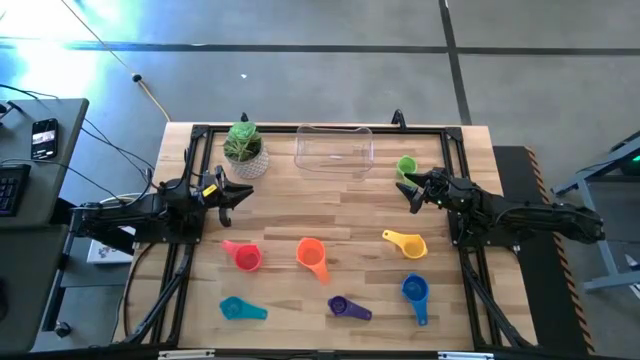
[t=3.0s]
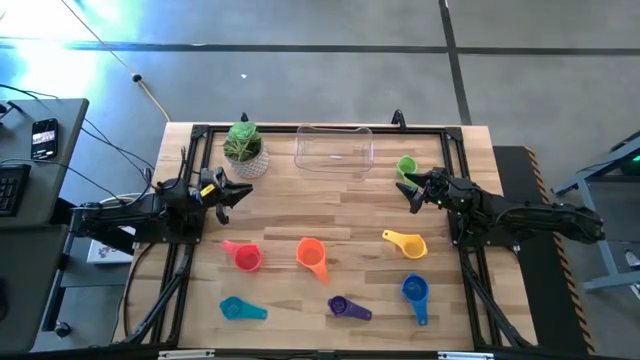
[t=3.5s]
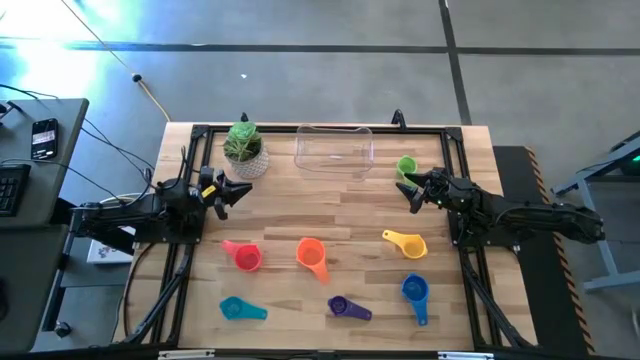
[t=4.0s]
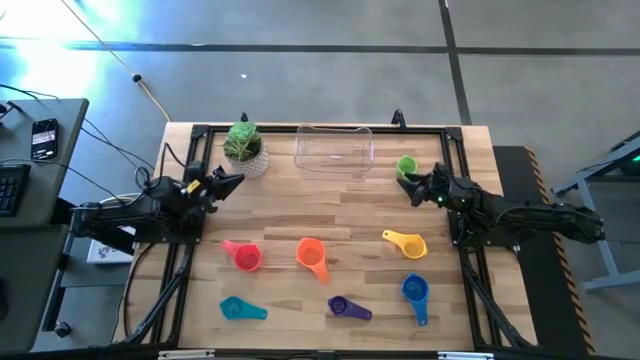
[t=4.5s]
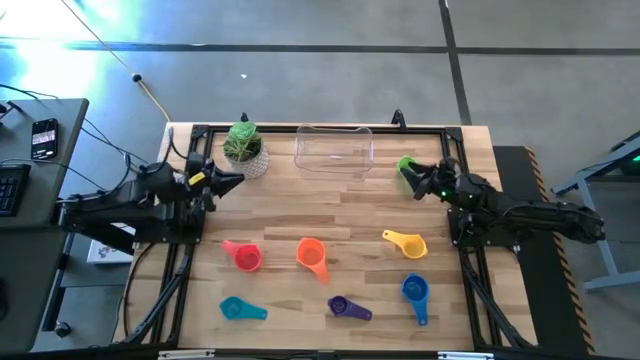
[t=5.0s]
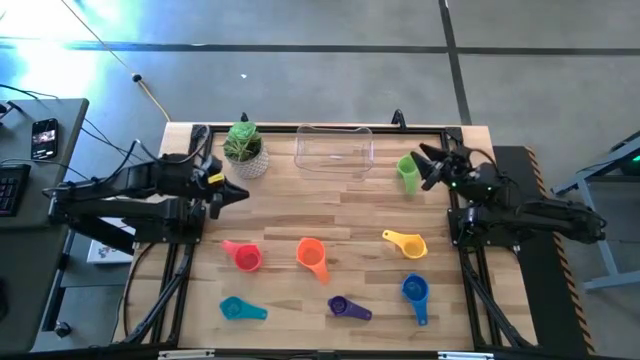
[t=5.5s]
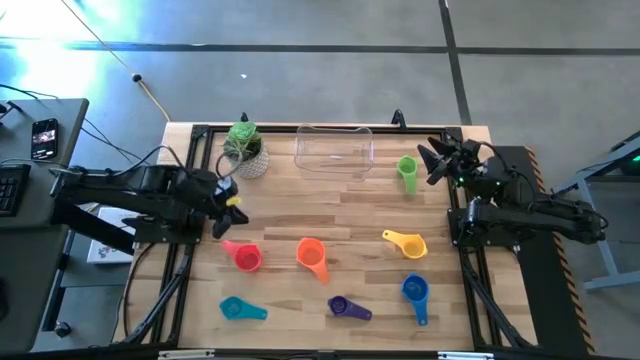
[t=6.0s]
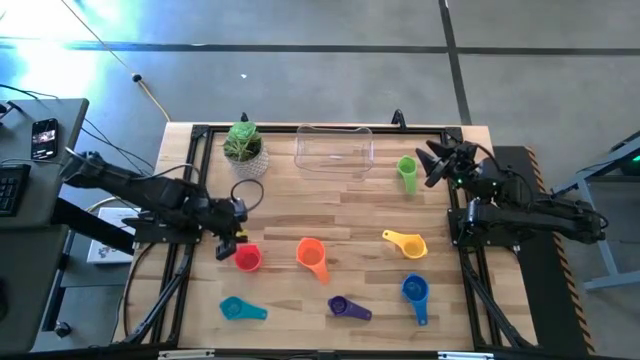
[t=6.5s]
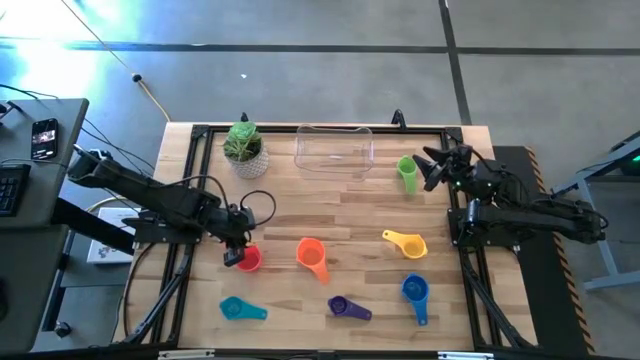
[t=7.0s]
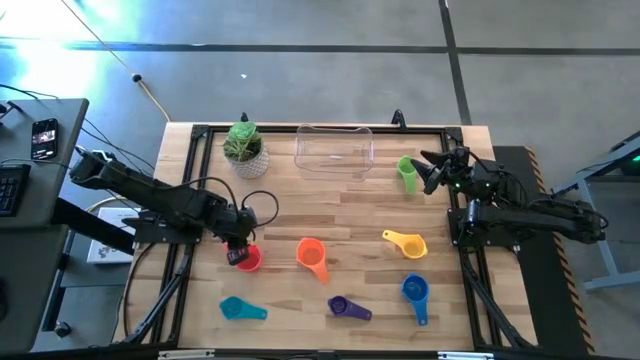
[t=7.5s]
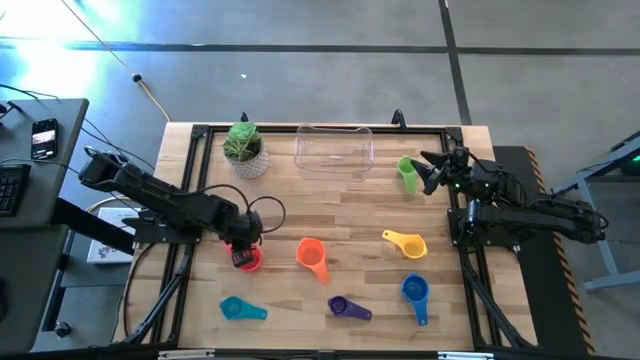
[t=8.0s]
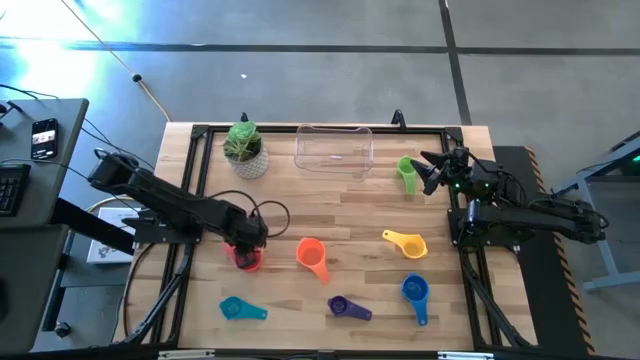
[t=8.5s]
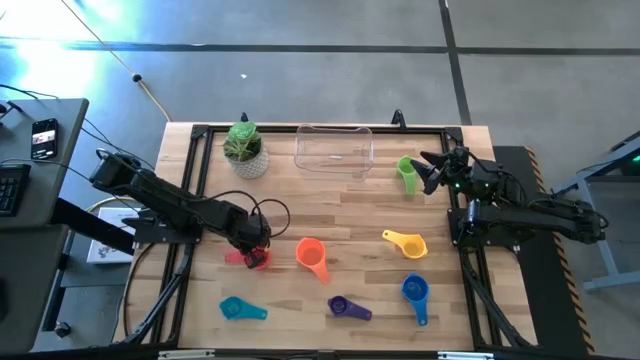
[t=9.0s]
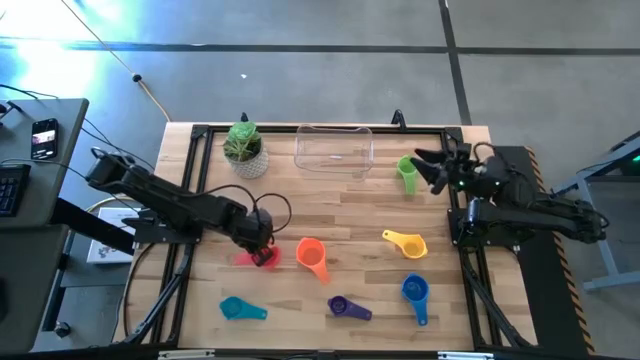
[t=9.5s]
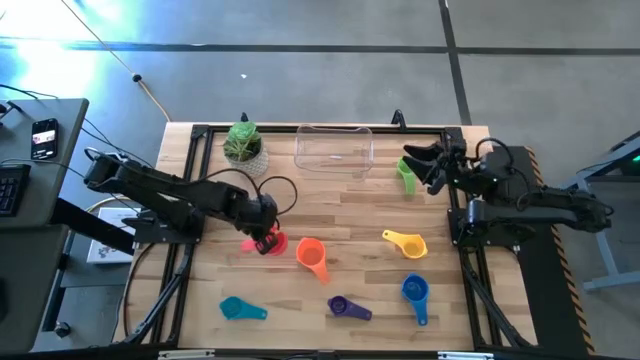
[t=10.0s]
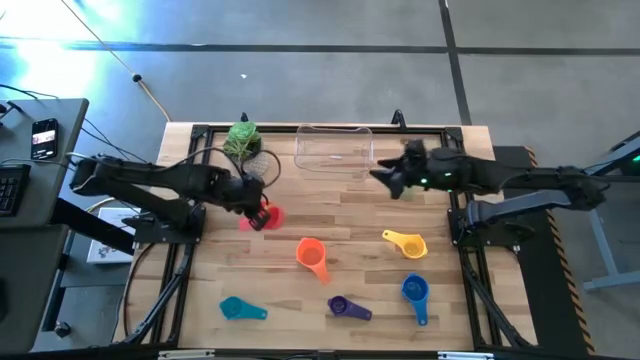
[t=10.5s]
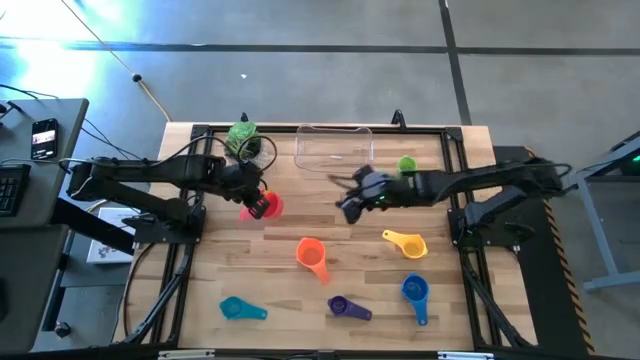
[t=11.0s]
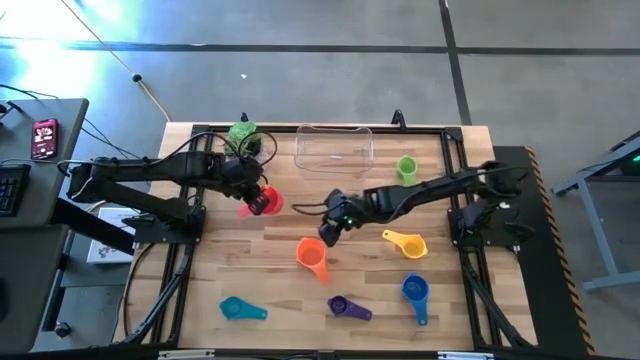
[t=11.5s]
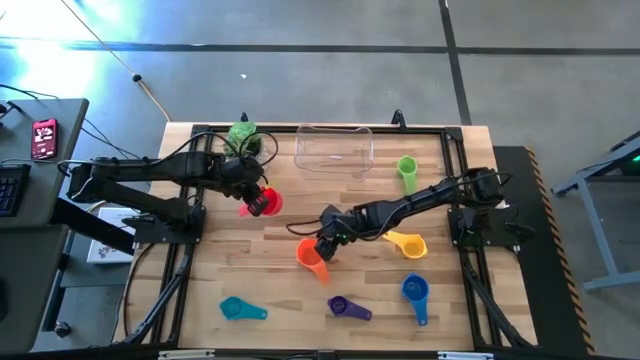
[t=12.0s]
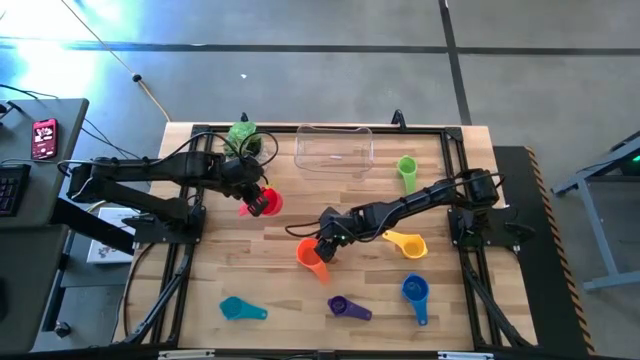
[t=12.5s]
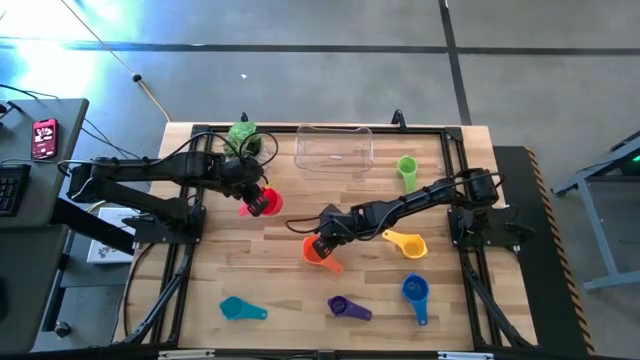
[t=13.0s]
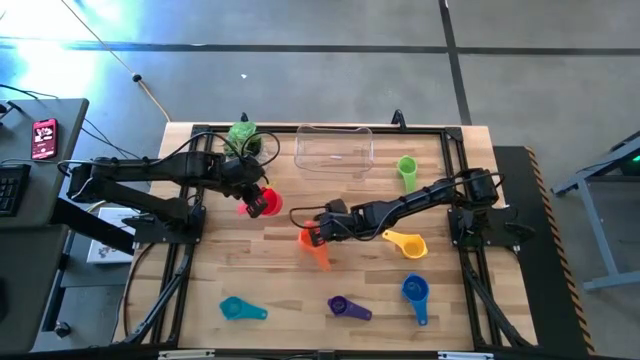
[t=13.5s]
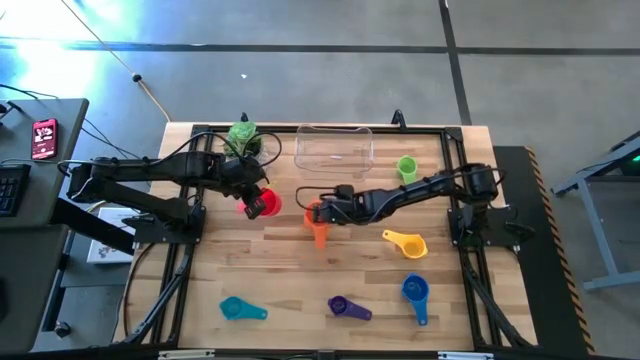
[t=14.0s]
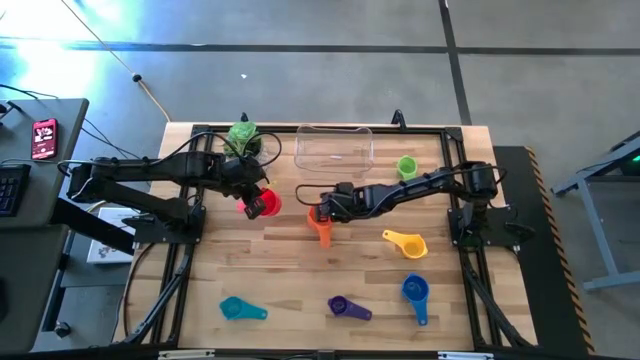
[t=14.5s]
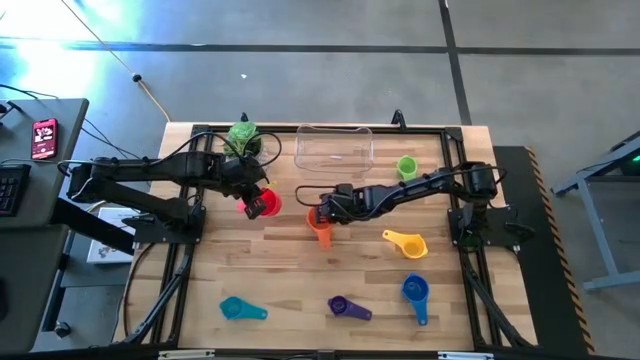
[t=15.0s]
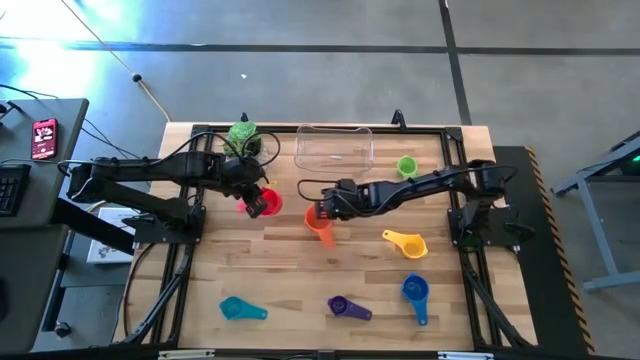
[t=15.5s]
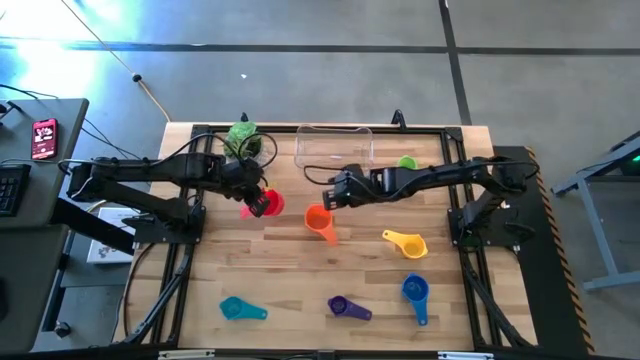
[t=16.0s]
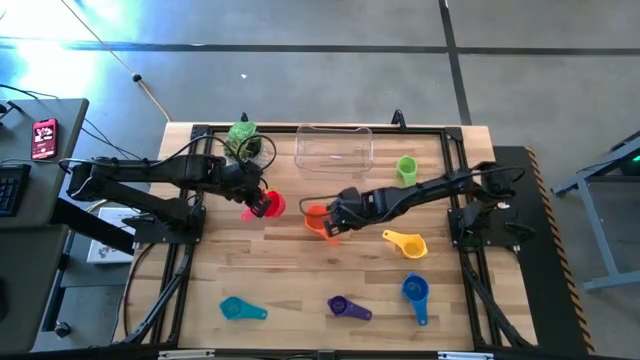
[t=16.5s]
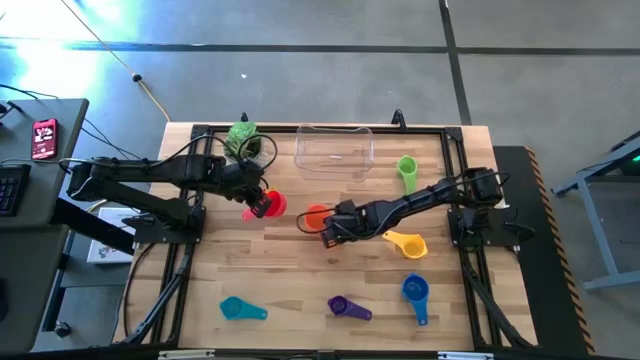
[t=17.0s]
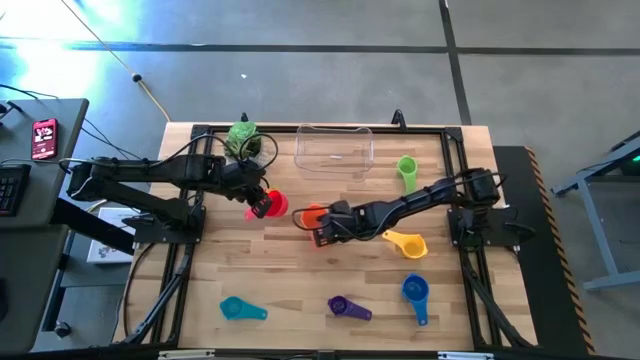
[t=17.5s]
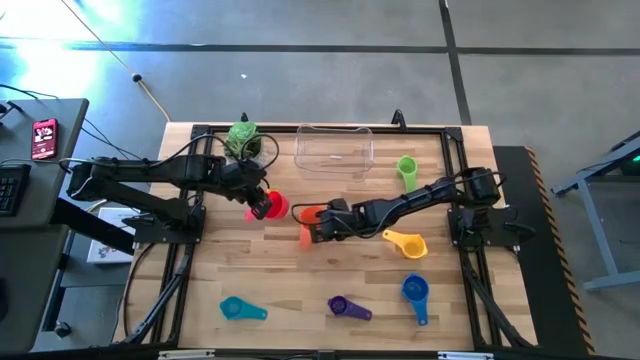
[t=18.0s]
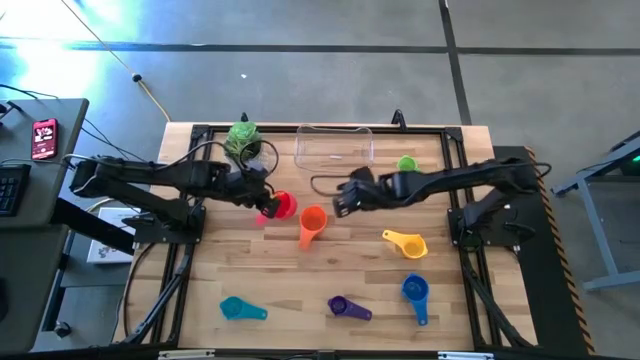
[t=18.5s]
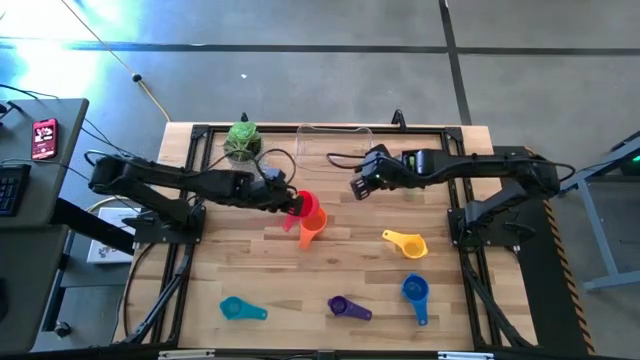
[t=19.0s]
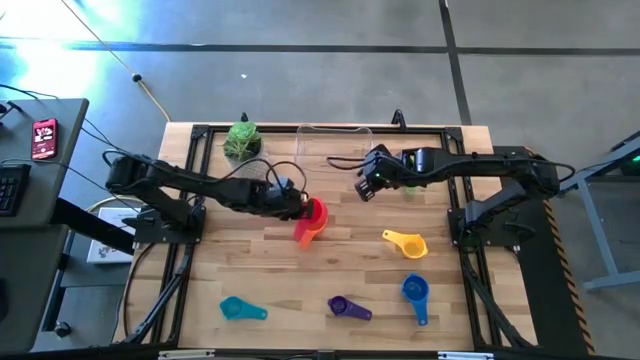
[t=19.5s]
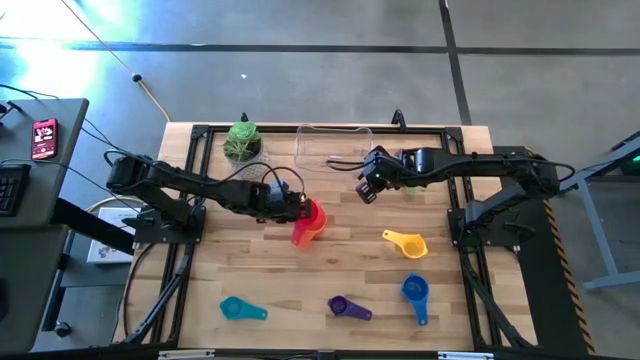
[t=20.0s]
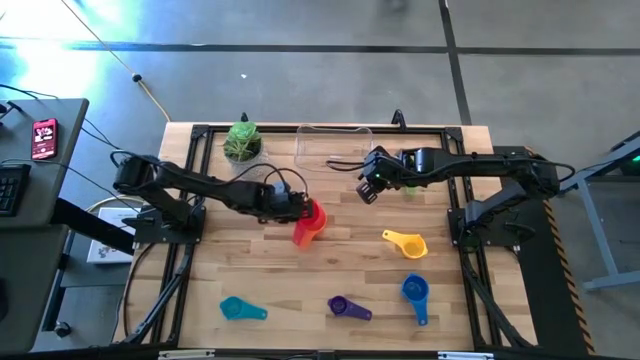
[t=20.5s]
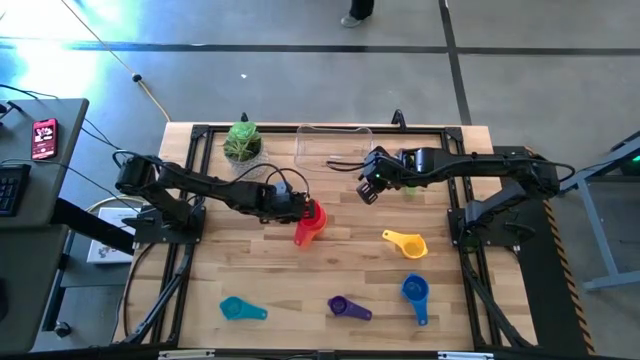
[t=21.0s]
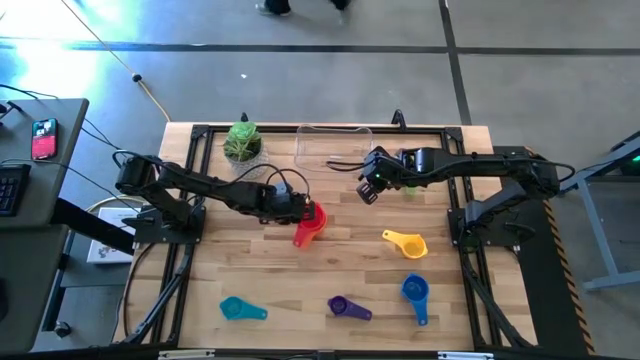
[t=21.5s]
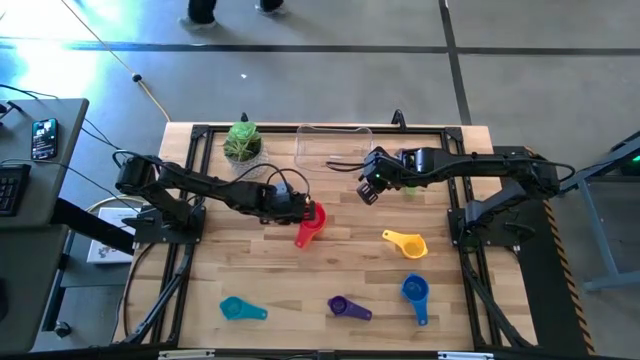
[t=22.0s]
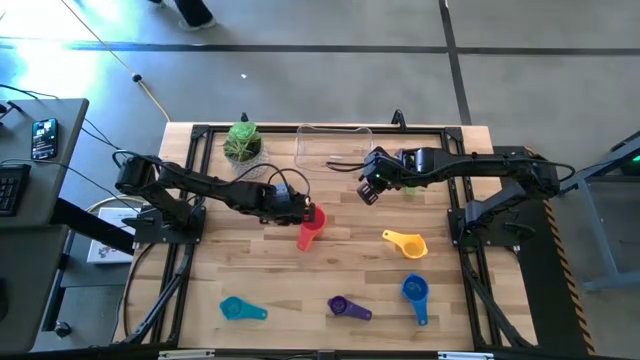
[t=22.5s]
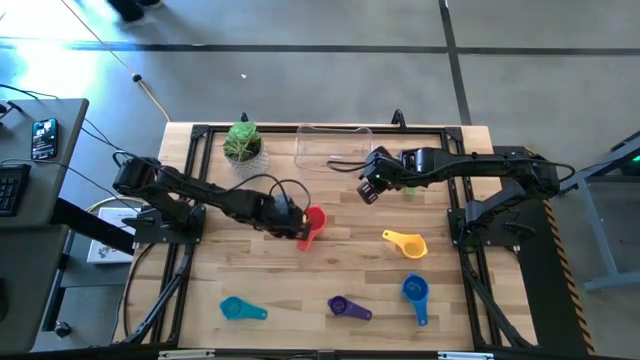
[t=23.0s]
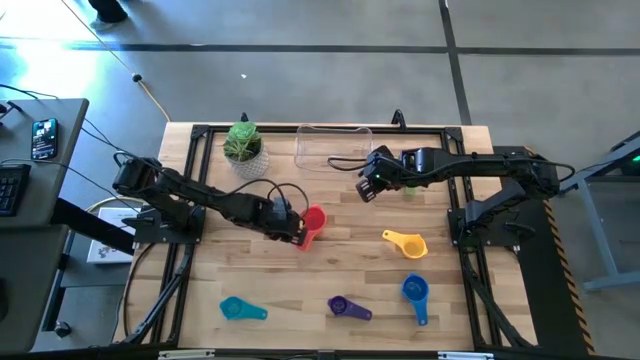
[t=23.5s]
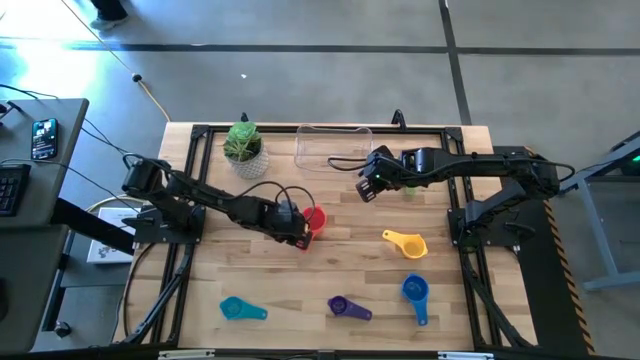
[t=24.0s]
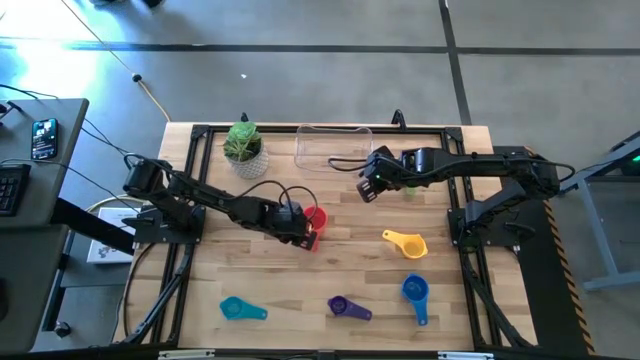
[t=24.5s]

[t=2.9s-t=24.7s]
Task: Nest measuring cups in basket
Stack the red measuring cup on top of the orange measuring cup
